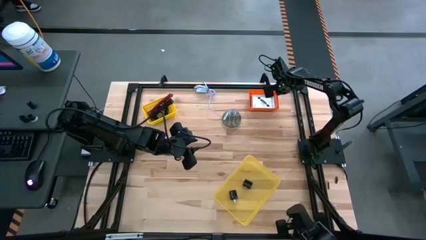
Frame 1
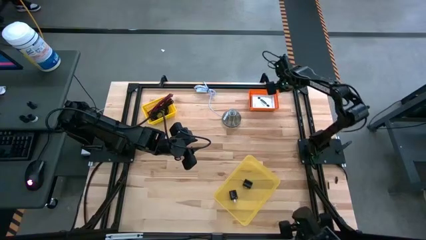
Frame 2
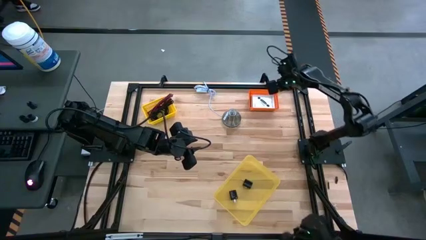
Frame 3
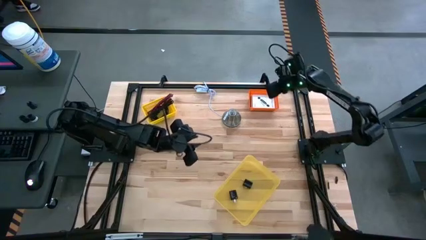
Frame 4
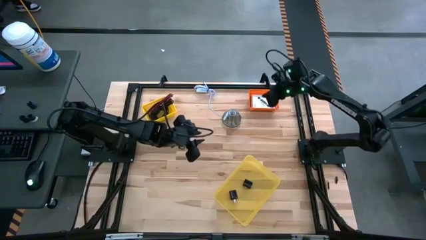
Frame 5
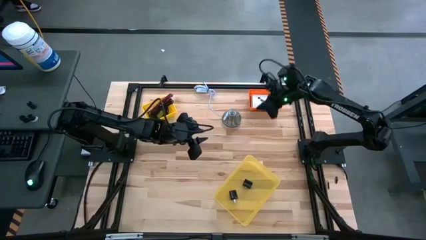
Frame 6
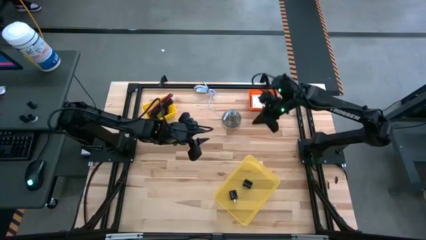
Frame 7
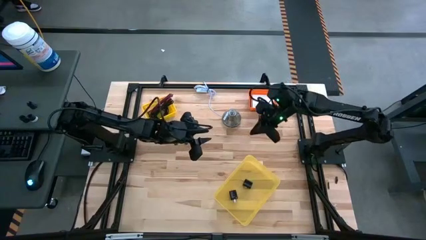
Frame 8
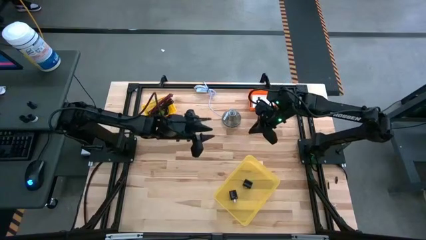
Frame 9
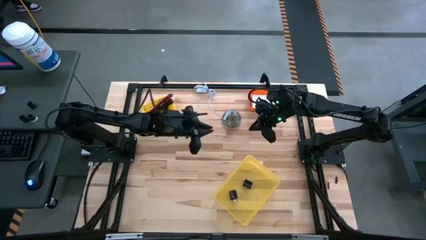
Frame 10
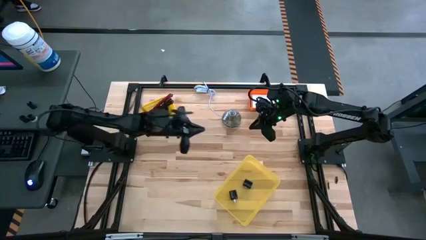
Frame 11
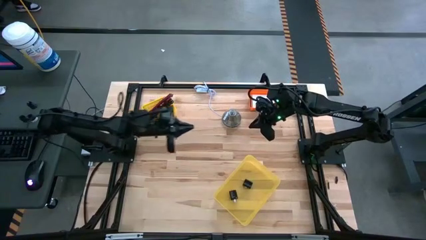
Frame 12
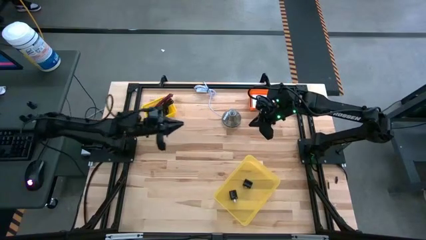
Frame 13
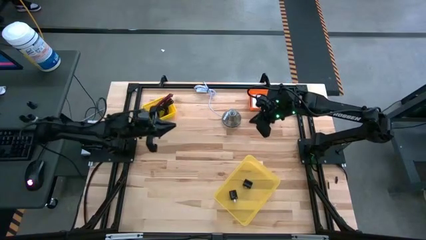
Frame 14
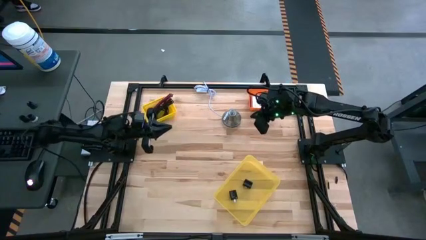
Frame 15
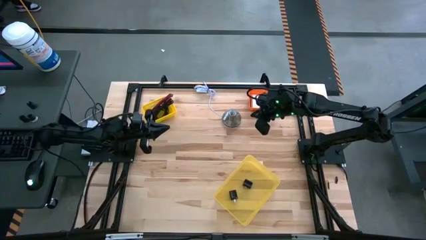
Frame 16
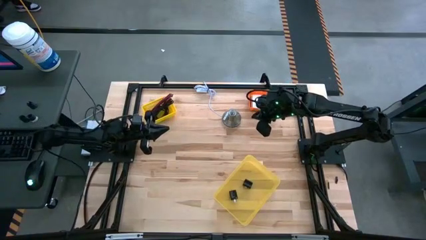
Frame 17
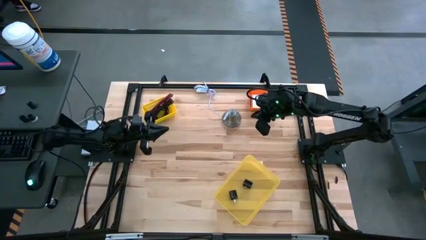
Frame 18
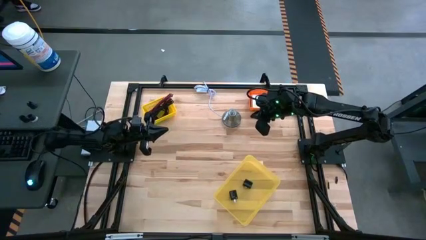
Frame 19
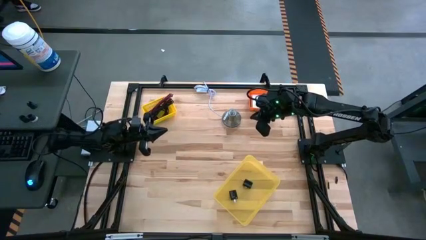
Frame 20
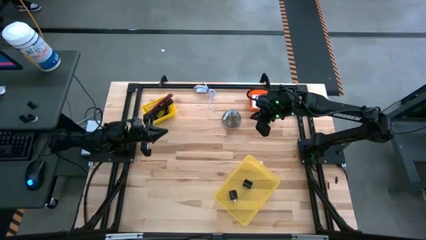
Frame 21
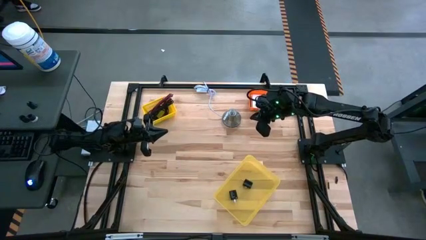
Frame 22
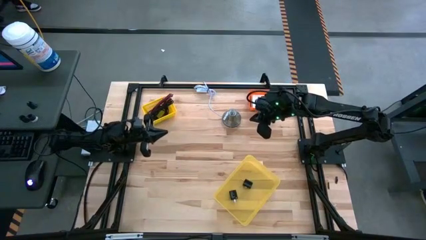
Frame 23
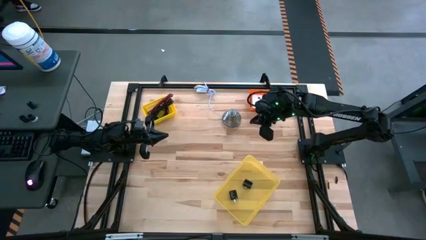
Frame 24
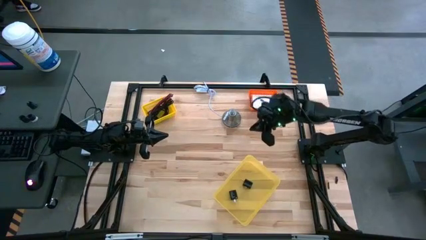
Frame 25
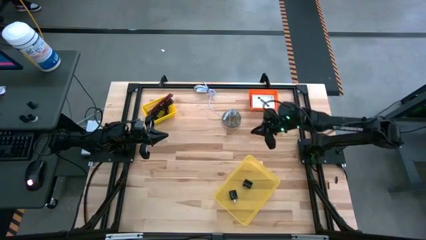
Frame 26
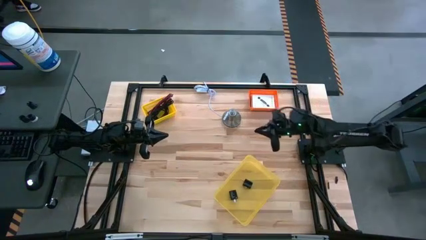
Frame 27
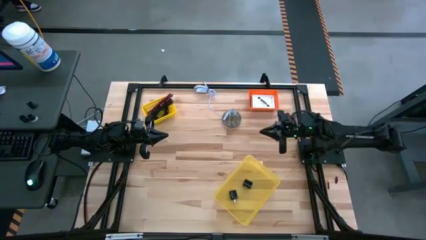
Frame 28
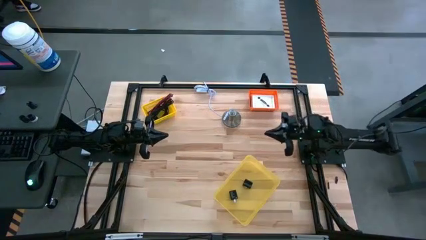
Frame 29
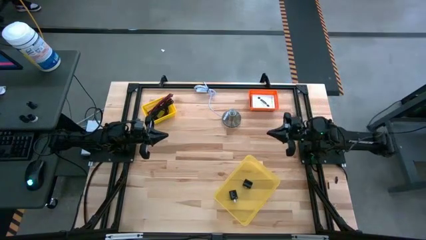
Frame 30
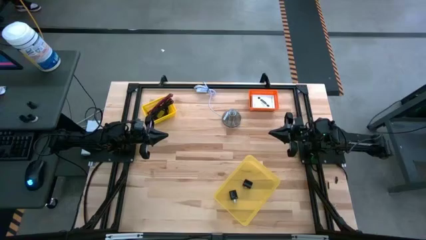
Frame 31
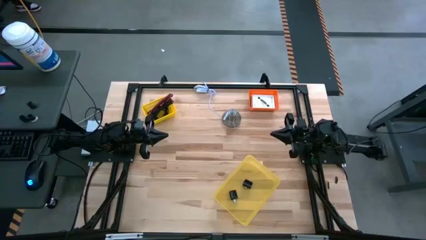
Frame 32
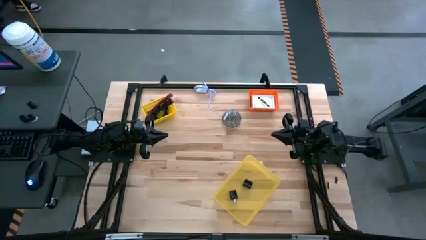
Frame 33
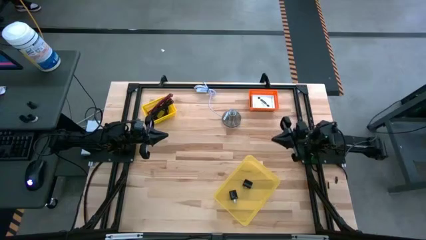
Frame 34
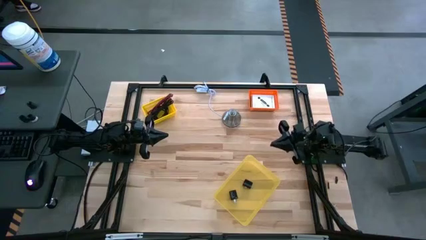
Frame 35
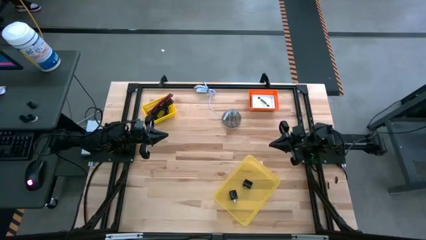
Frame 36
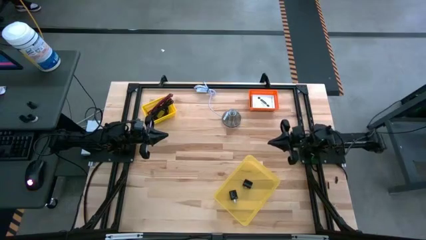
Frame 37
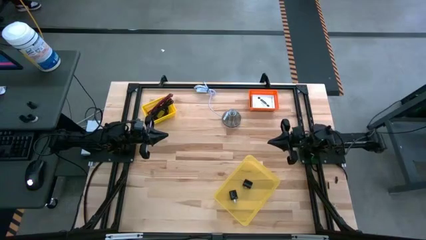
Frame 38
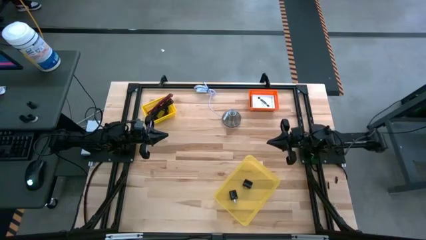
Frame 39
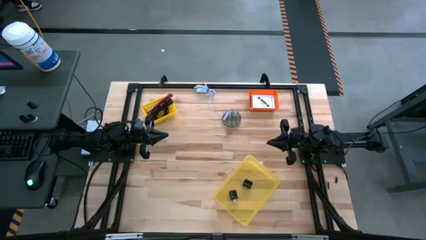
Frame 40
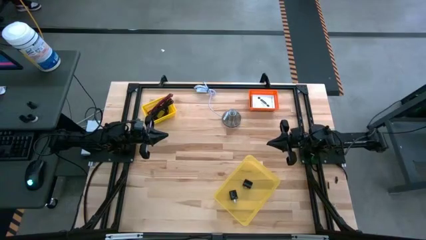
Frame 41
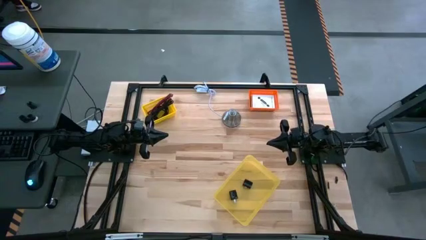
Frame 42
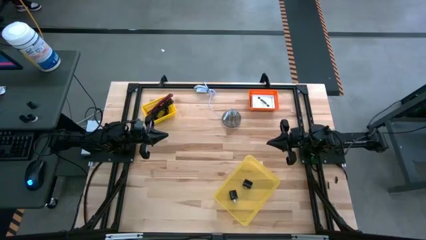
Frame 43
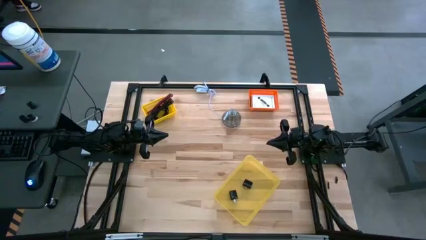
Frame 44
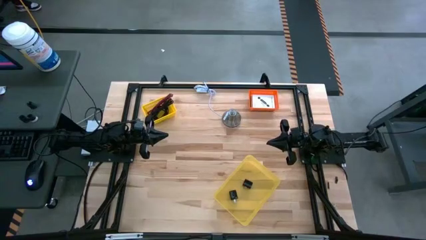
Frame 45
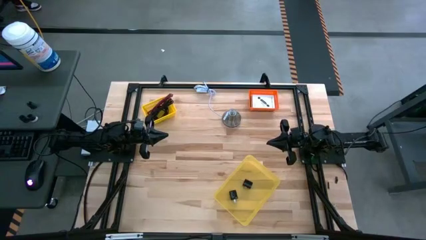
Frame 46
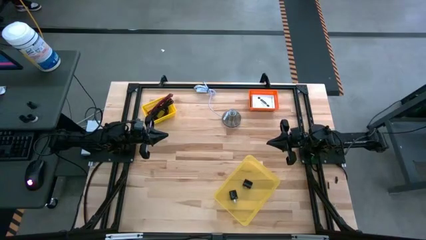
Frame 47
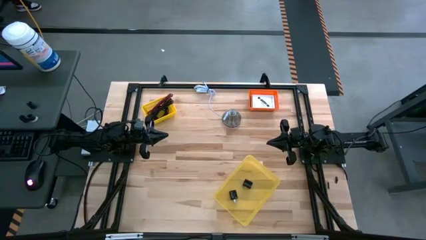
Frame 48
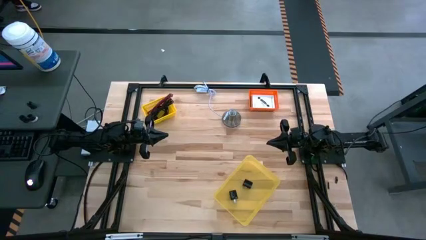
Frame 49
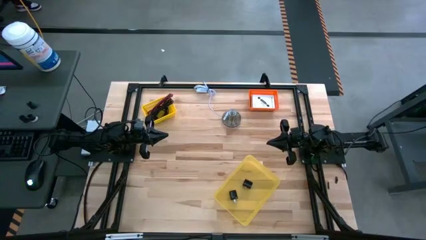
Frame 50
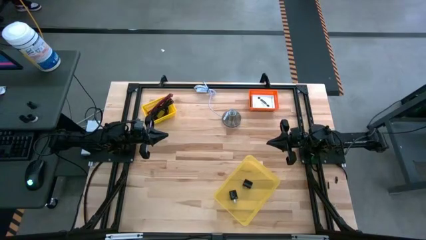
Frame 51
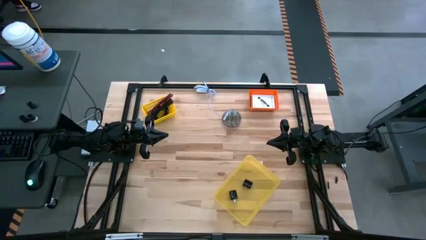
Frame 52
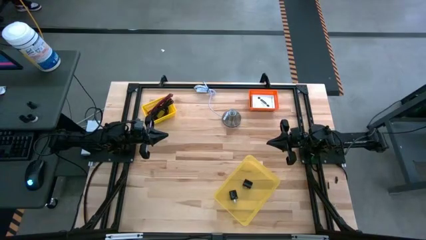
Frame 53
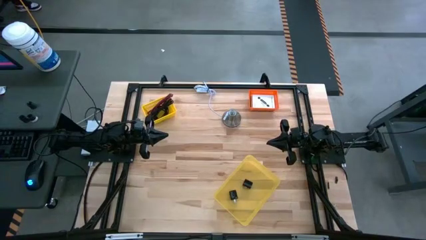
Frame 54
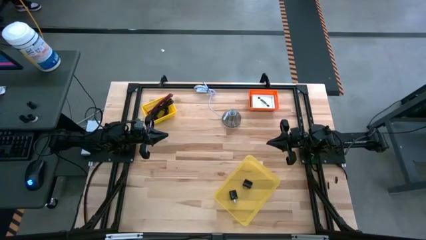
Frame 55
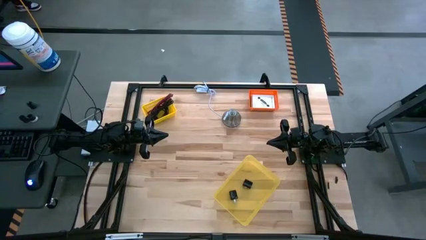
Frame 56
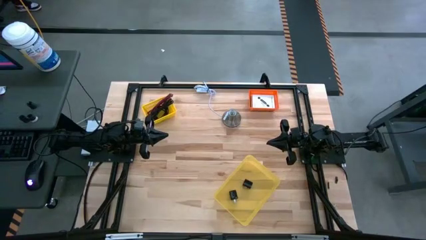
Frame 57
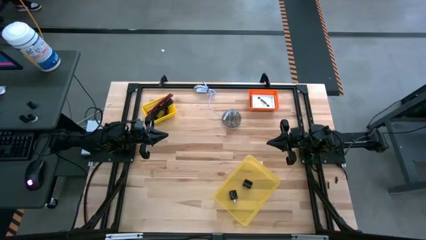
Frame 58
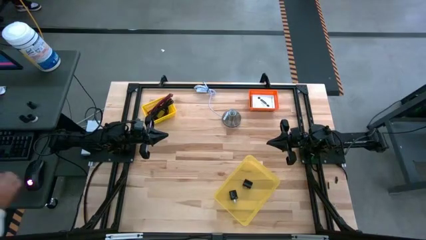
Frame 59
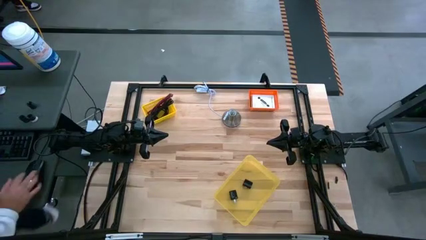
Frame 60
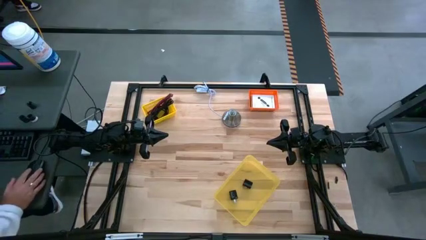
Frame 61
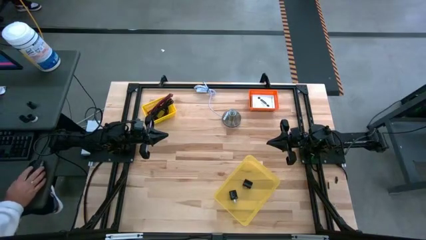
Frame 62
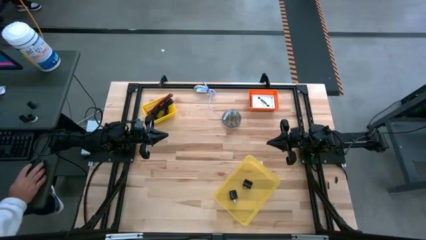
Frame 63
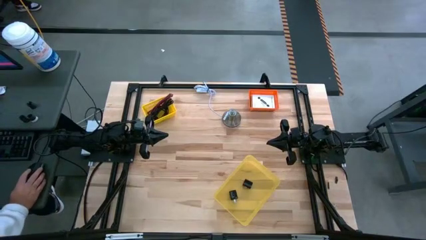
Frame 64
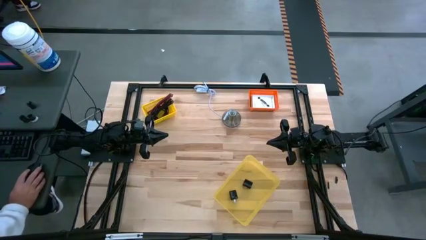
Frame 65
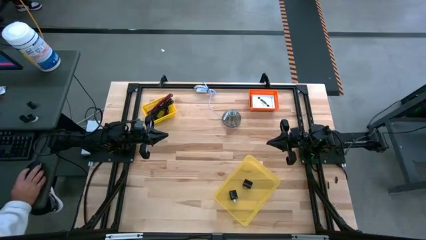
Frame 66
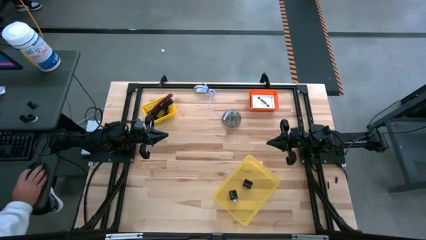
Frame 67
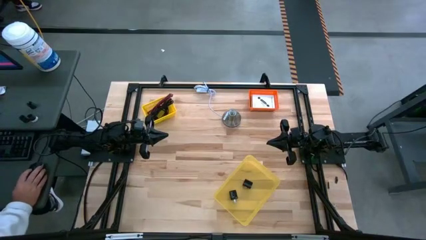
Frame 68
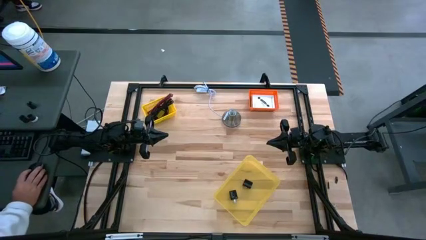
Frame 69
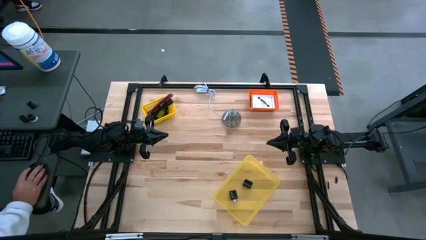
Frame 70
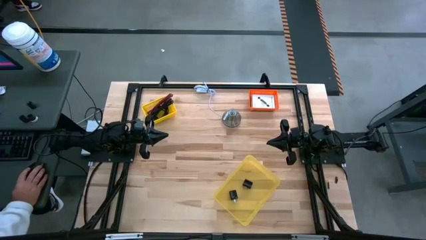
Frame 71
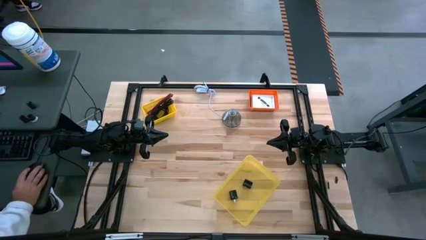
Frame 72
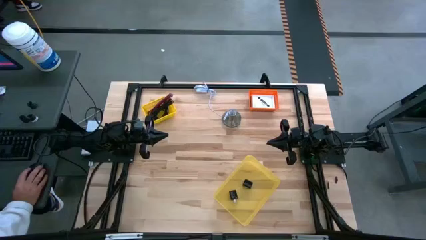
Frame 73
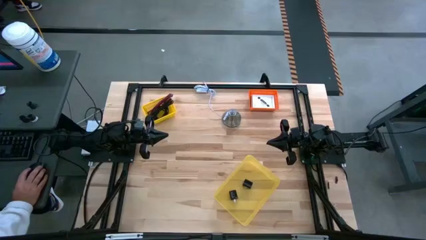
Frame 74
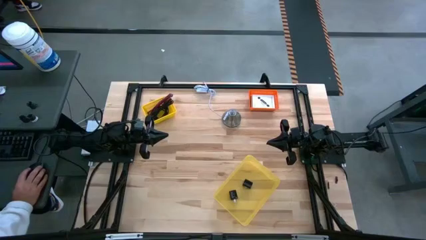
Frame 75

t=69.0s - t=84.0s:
Task: Pick and place items into bin
Return to Home Position
